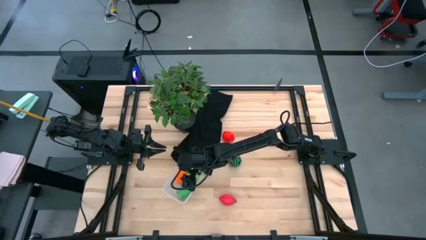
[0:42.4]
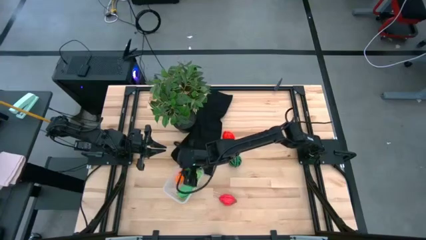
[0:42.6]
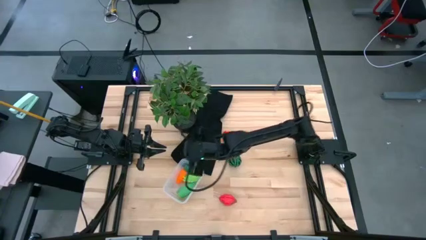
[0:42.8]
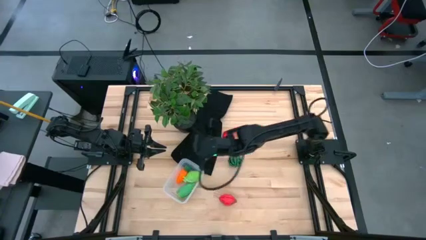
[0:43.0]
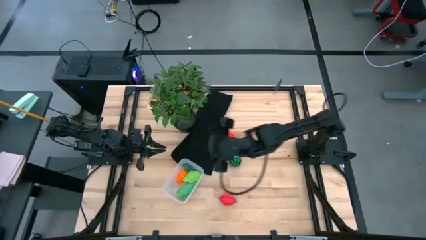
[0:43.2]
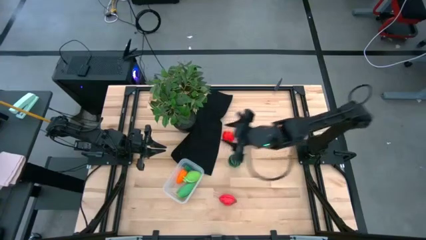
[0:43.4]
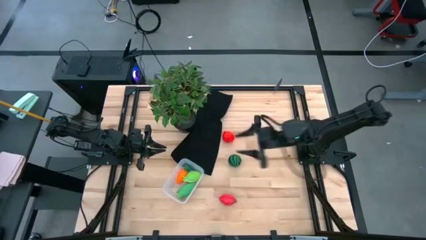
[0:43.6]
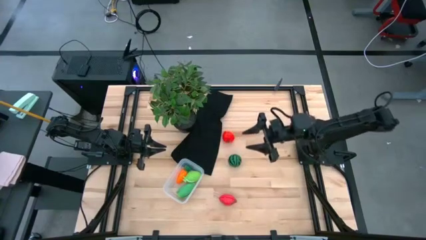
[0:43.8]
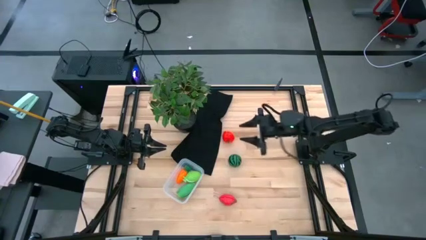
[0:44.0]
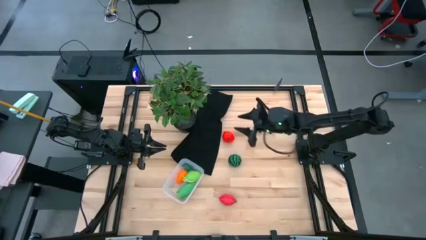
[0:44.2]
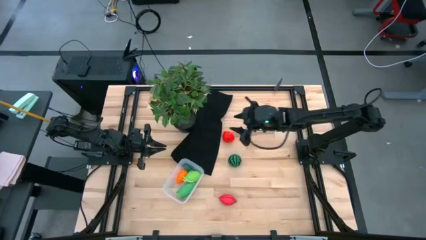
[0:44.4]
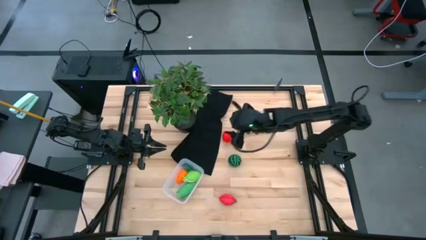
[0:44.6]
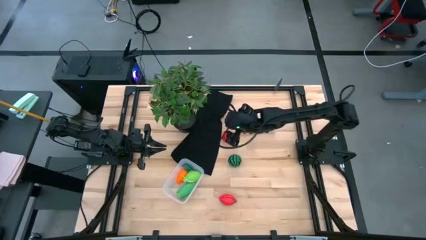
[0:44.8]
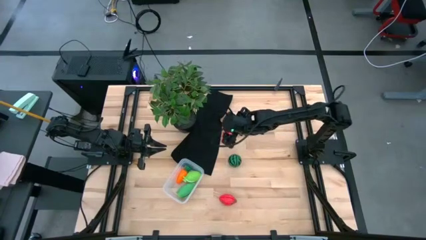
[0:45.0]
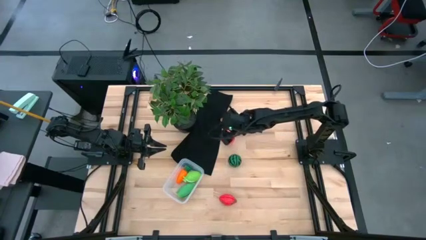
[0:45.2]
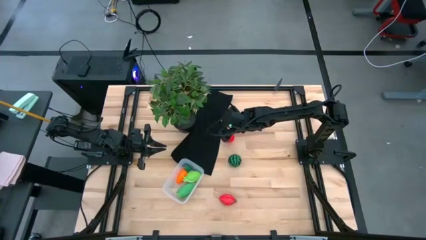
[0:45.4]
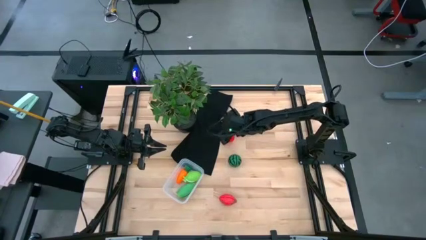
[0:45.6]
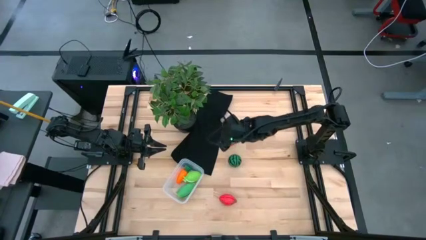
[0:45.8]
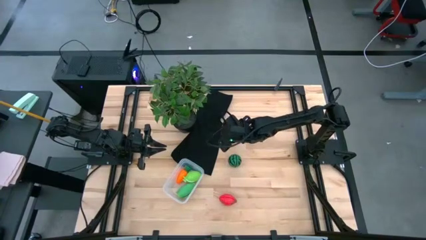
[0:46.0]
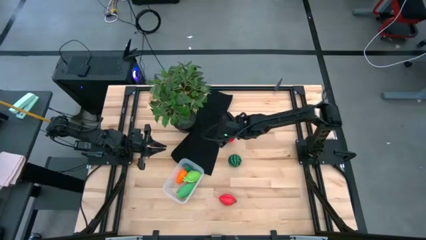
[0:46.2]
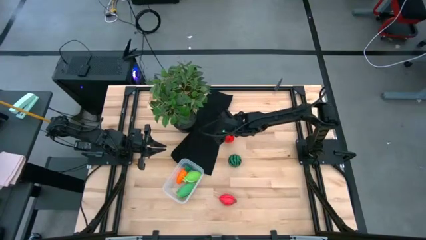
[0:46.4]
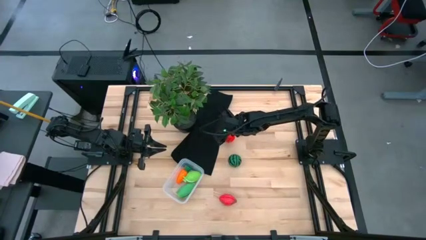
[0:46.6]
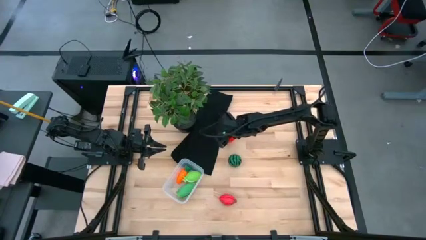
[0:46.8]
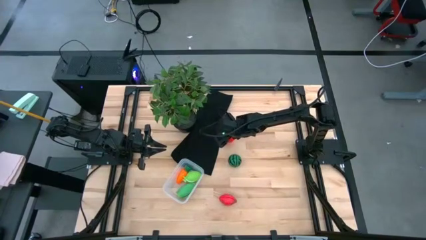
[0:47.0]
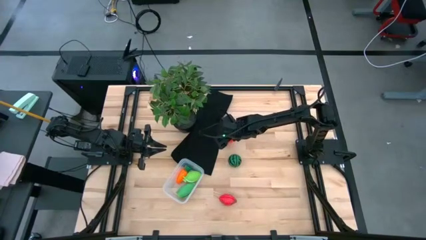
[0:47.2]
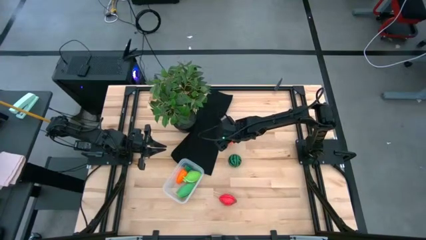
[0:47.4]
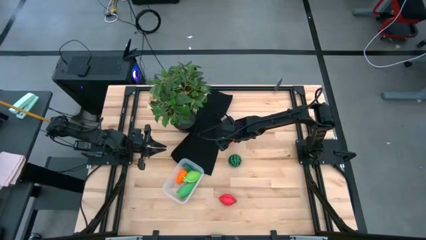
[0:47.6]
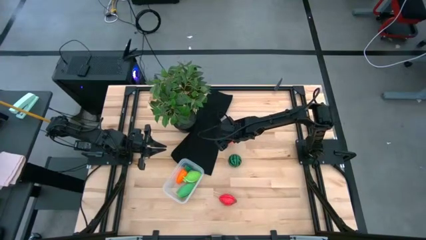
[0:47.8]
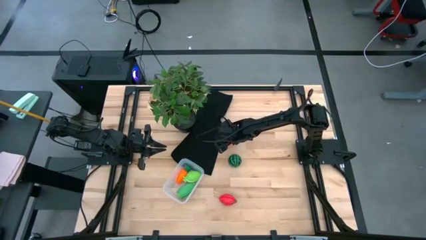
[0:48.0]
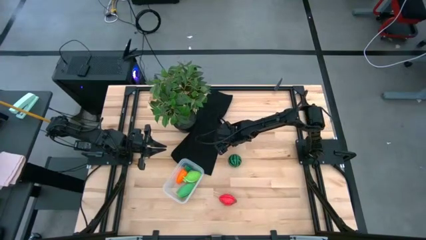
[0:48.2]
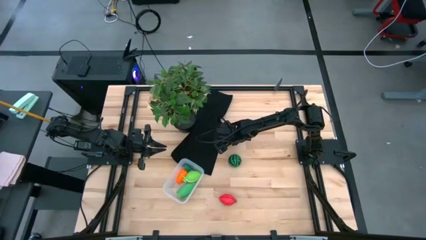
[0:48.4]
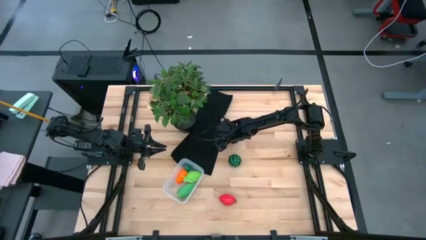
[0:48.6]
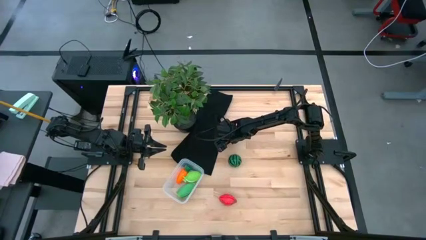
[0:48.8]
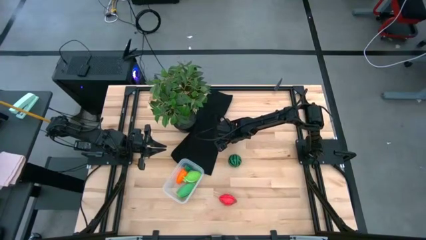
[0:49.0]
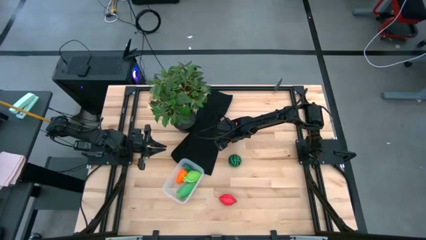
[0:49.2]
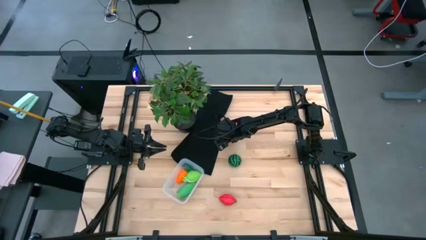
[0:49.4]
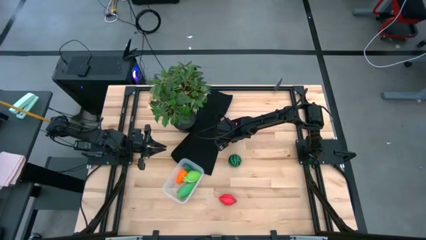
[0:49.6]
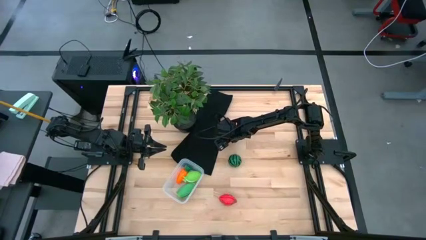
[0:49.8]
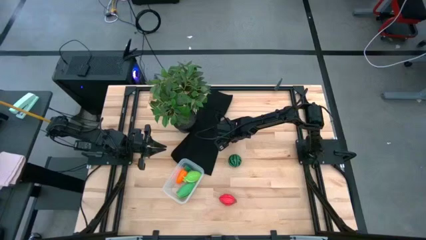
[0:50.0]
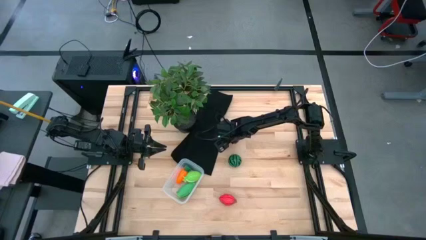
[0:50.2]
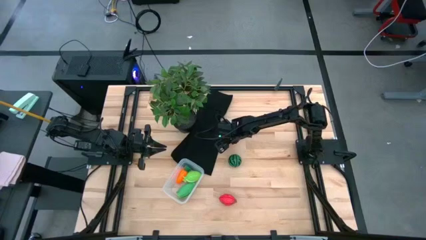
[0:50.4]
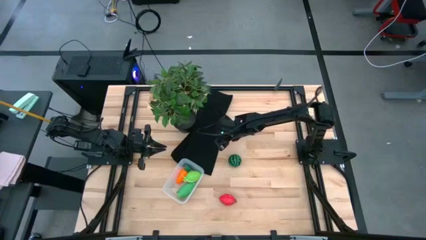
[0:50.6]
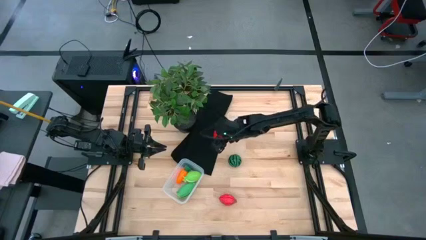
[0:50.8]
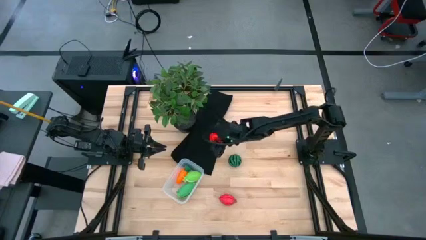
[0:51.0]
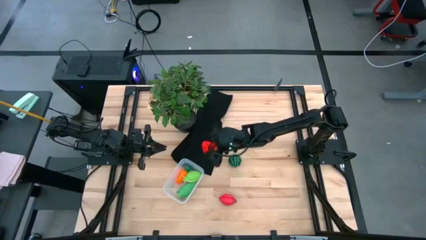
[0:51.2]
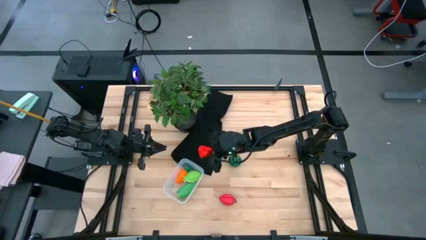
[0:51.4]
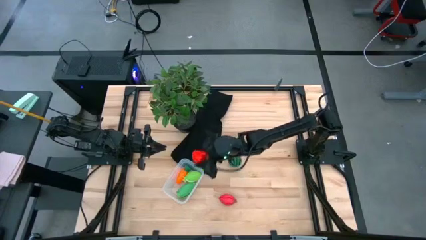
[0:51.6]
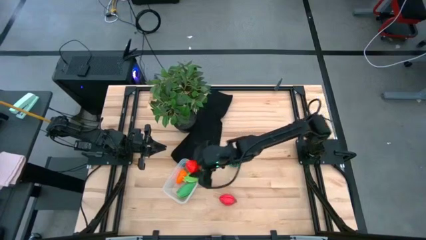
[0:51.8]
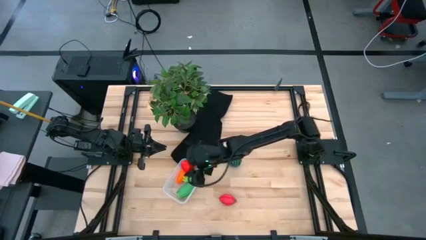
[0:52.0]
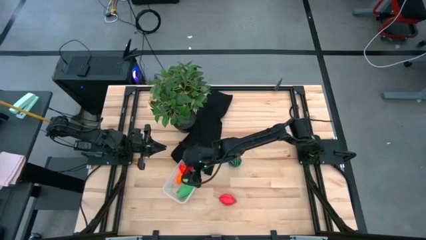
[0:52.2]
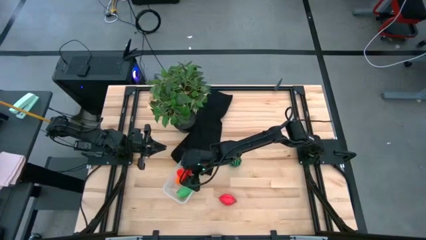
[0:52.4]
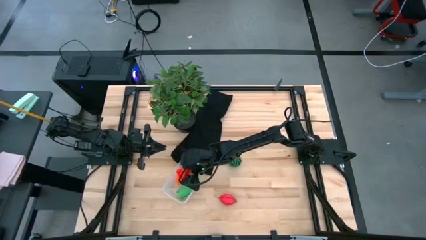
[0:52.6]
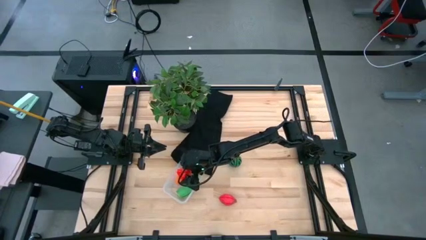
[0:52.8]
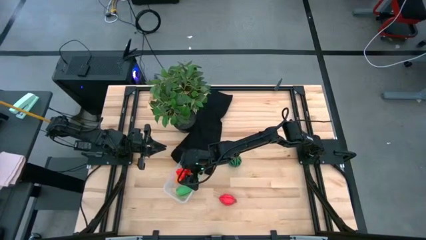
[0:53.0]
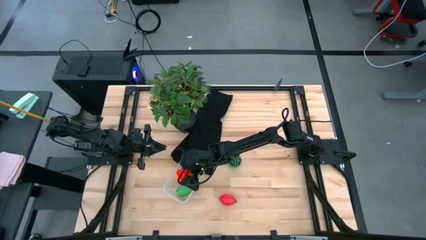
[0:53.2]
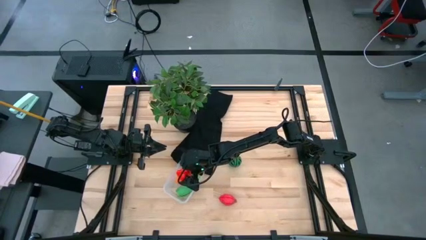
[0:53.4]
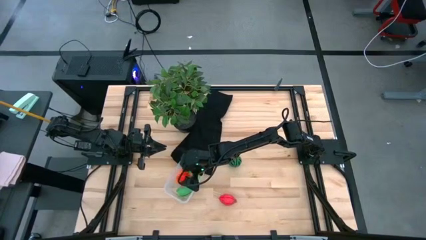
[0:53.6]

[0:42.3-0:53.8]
Task: Pick and placing Produce into tupperware
Put the red apple into the transparent bin

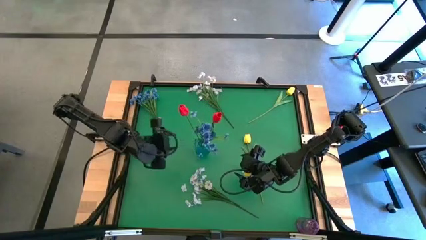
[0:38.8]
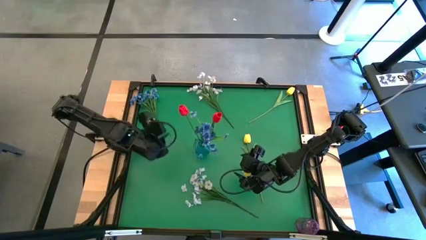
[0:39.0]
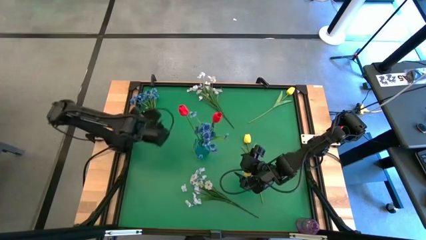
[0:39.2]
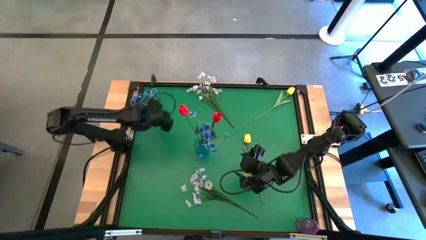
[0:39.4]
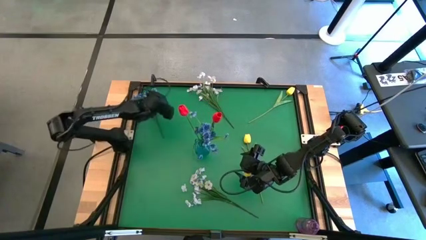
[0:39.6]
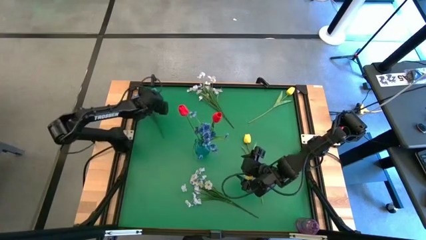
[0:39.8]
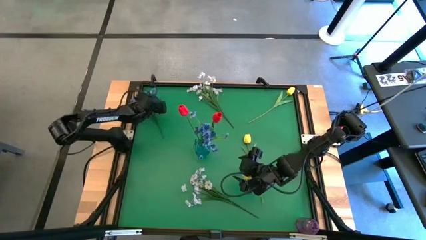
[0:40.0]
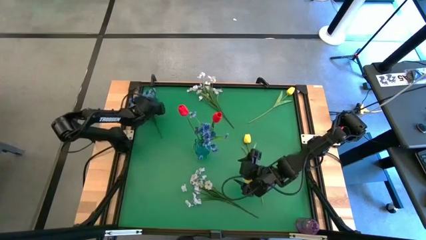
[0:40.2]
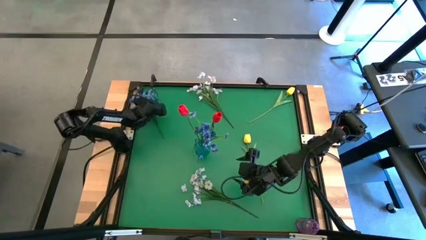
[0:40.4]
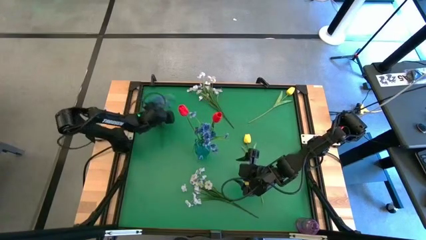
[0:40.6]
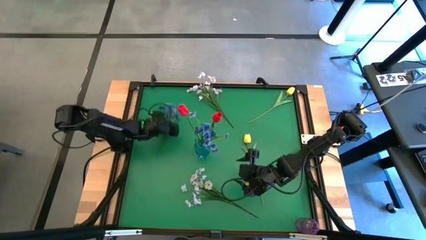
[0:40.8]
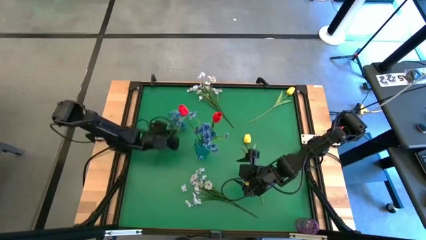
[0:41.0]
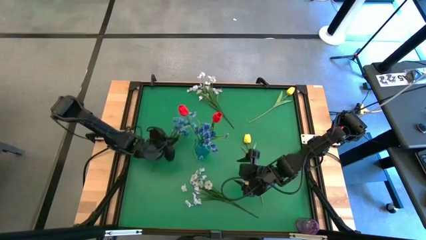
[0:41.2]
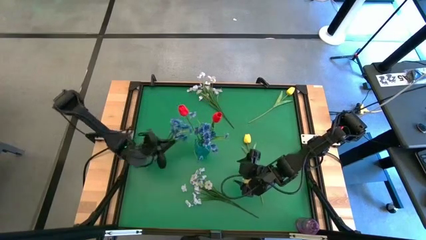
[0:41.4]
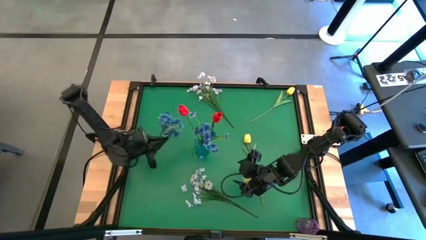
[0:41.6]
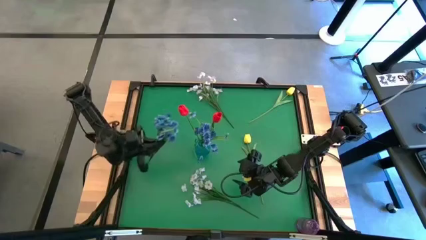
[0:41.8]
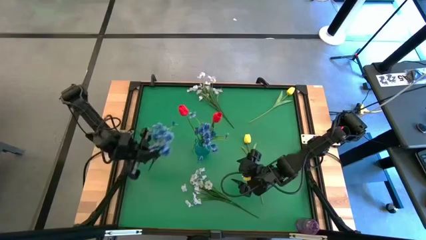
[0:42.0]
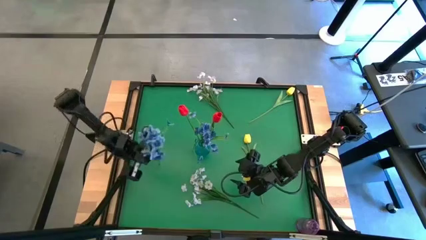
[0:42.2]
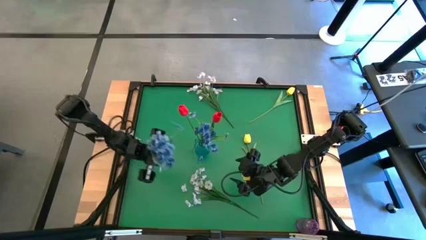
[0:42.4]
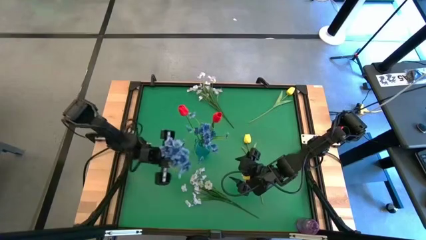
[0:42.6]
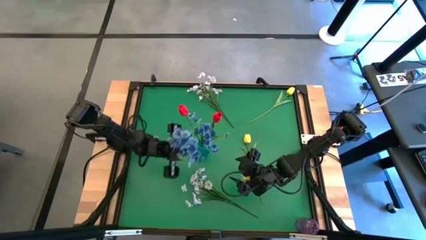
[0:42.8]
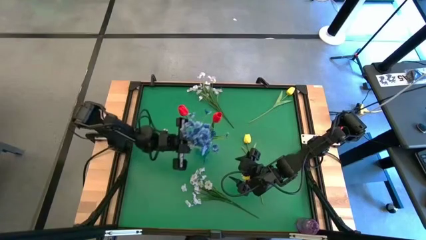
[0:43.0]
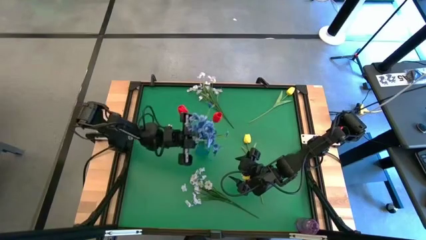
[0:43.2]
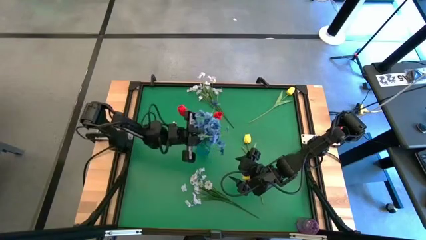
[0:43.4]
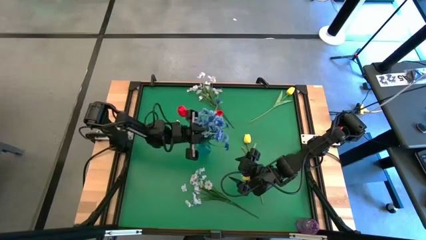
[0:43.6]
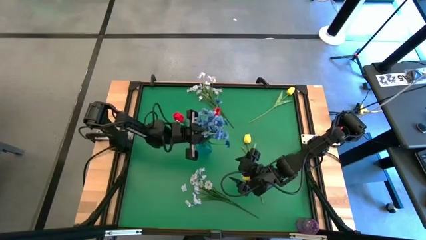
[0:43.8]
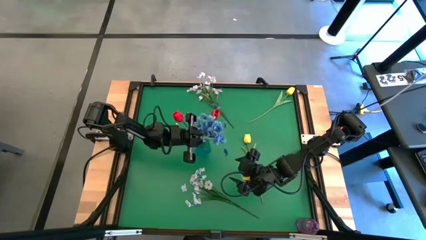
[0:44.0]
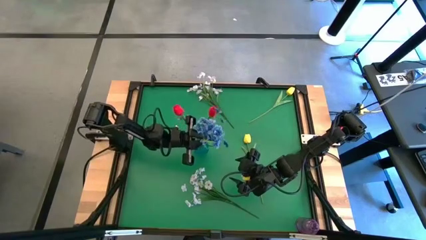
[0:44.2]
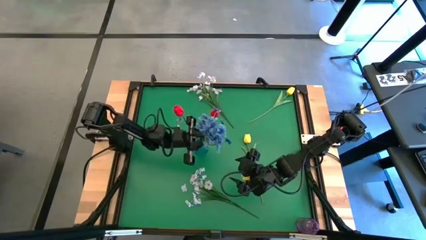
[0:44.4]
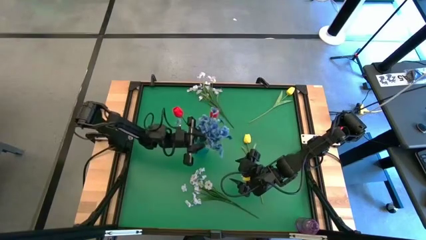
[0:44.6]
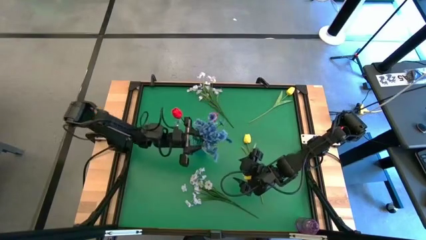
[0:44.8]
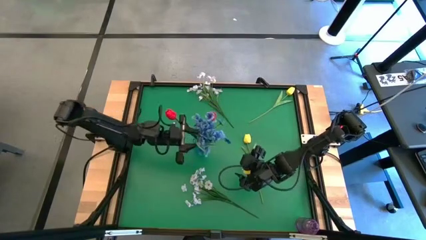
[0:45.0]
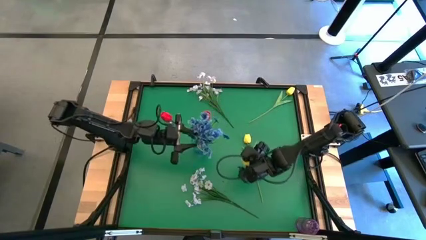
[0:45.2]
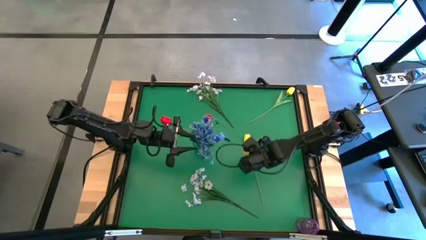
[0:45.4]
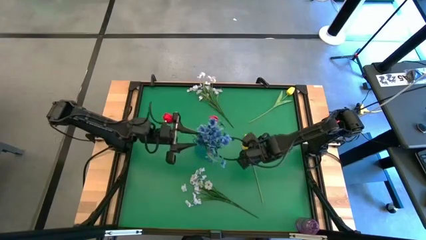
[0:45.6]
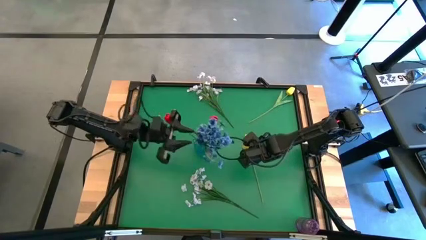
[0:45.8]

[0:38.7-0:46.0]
Task: Sort flowers into vase by color
Put the blue flowers into the blue vase
